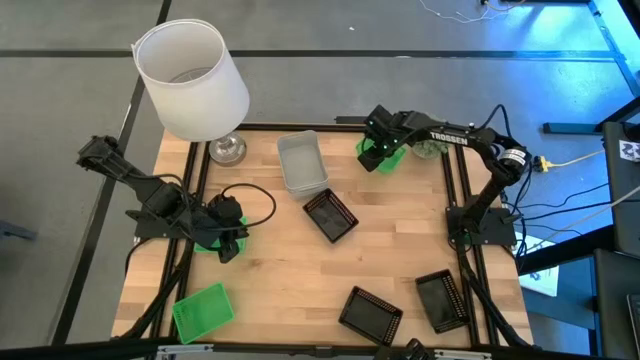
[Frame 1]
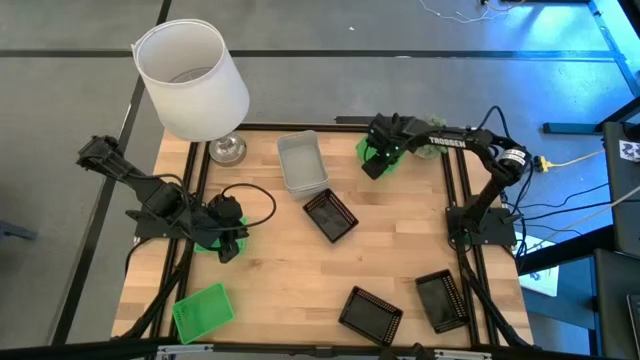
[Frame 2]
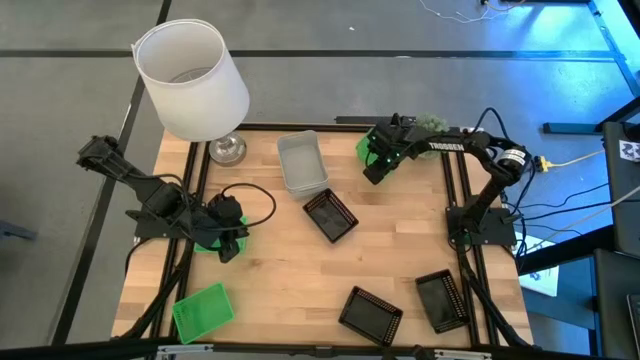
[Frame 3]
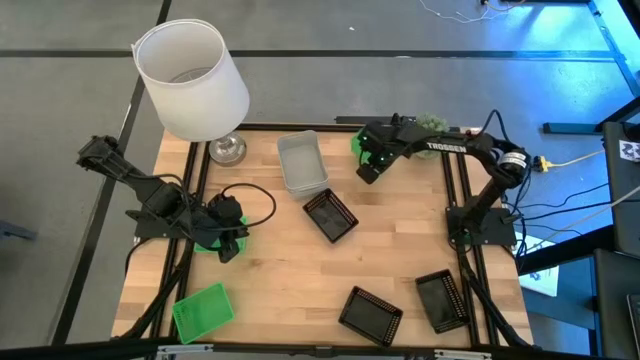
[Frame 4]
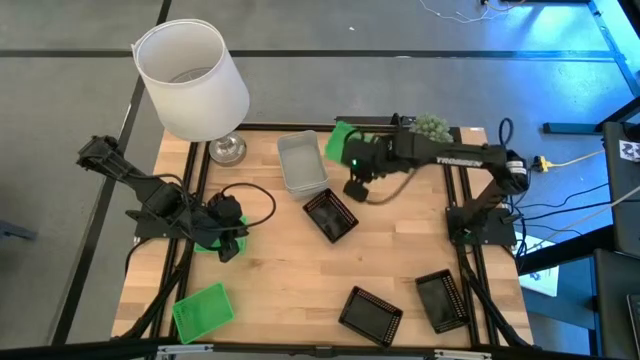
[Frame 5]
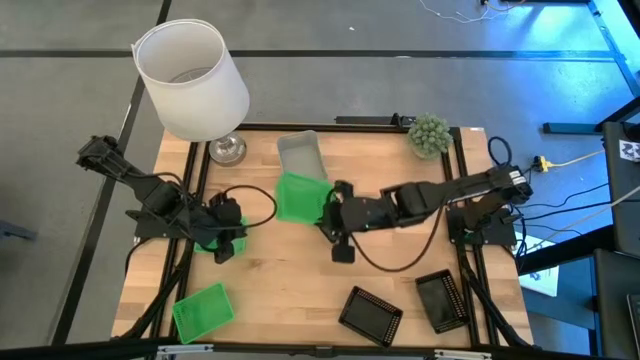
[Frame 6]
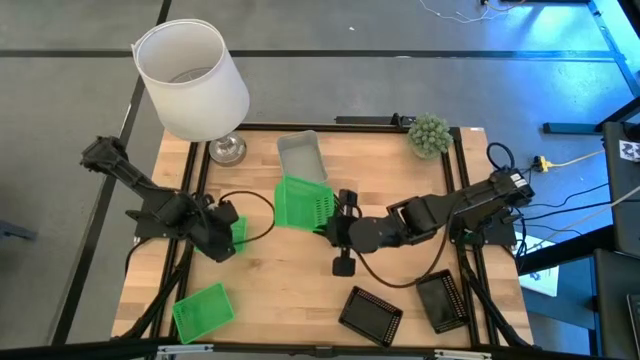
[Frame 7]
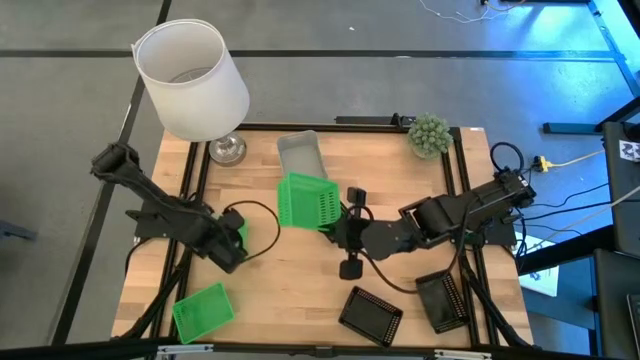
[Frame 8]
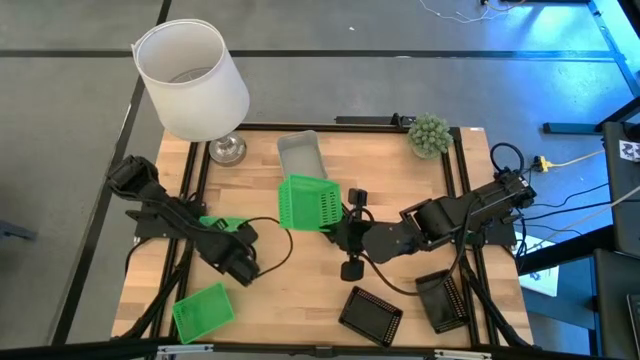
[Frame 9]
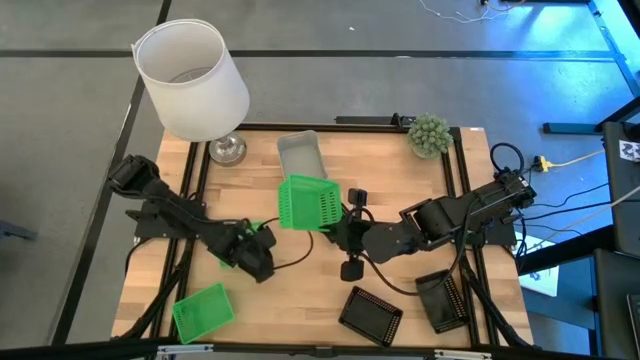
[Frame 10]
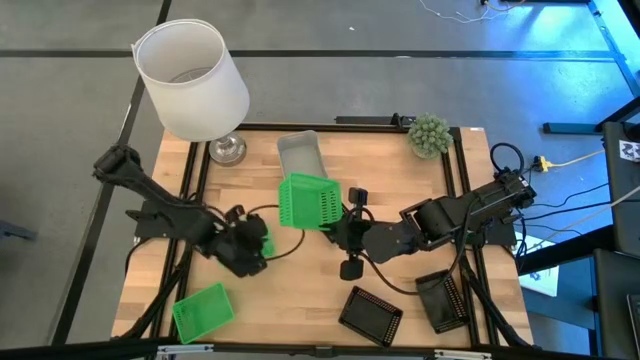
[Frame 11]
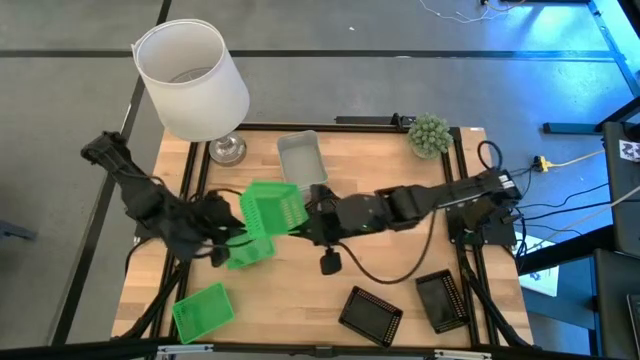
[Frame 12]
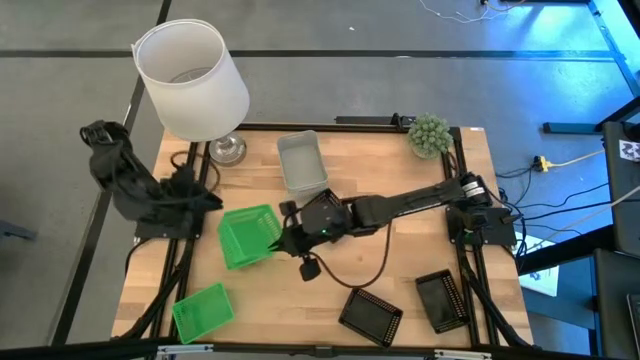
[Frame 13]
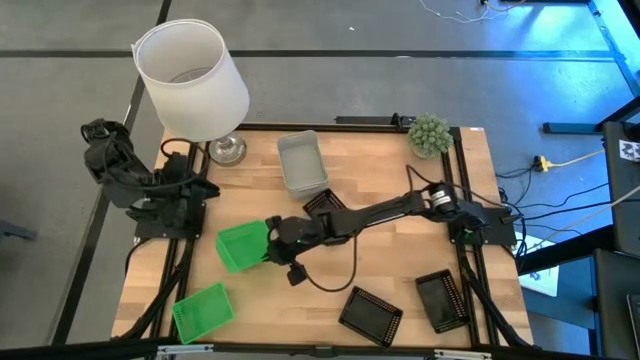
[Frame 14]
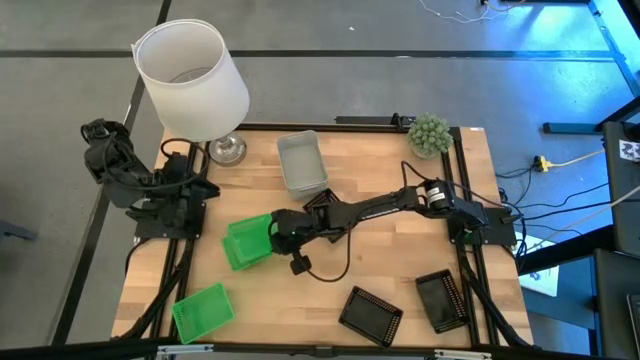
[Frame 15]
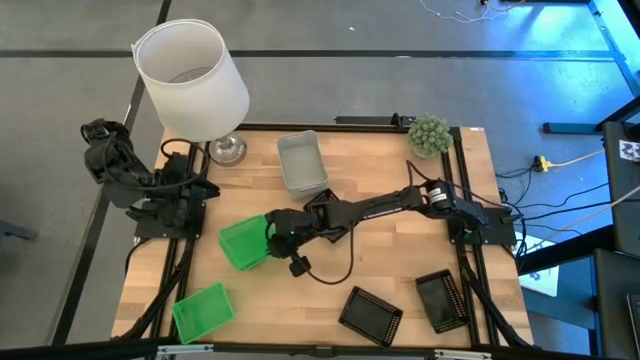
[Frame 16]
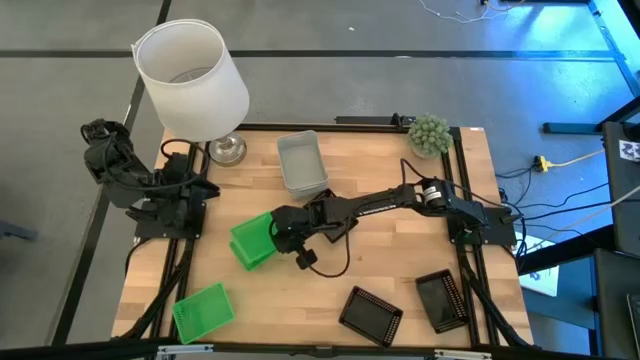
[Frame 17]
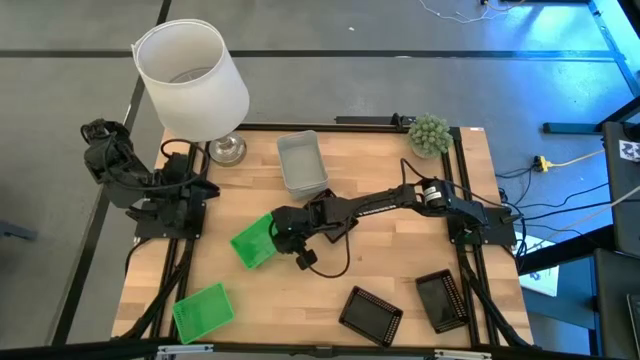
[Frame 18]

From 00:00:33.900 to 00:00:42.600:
Stack the top right green bin on the middle green bin

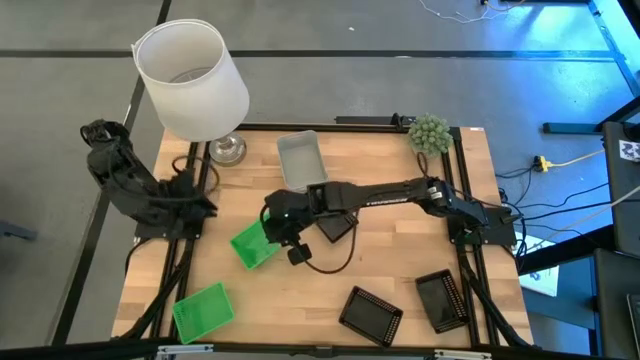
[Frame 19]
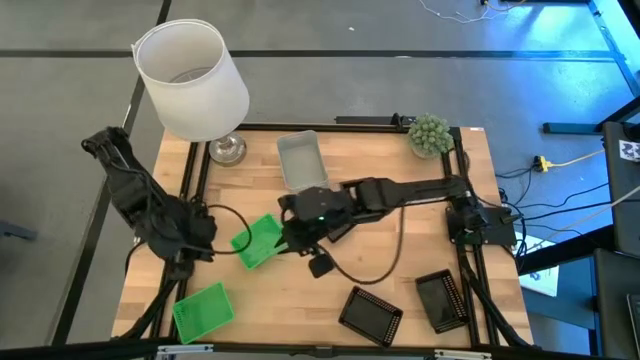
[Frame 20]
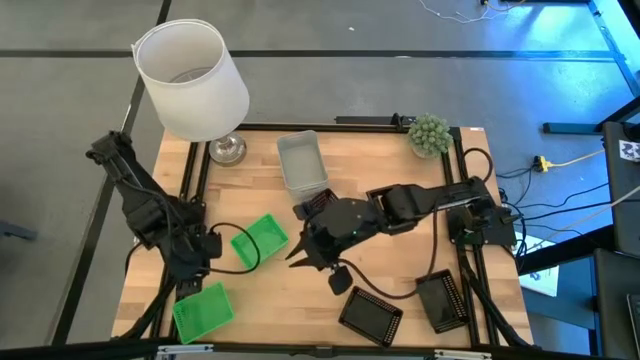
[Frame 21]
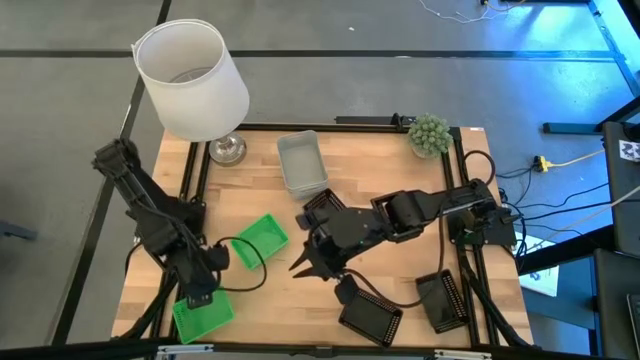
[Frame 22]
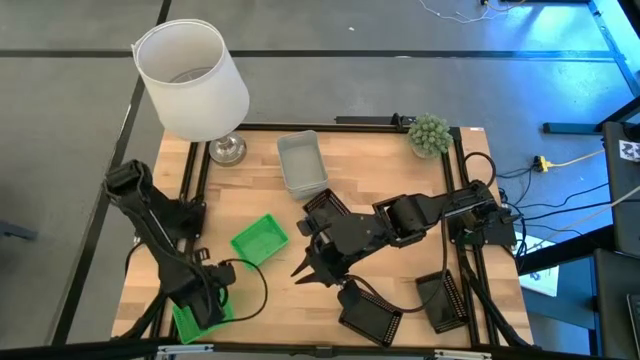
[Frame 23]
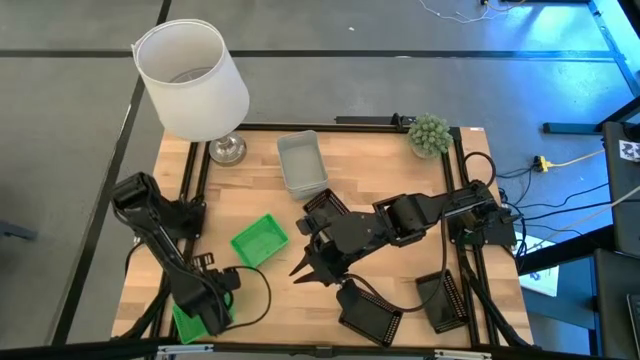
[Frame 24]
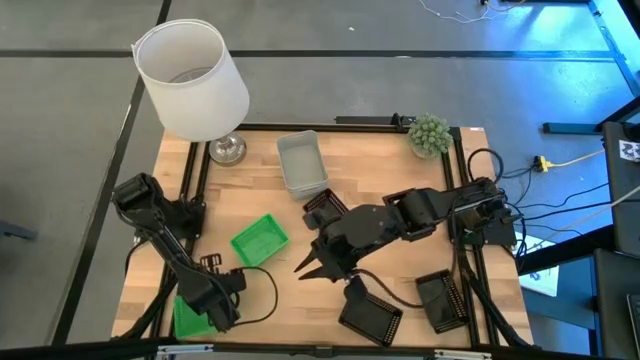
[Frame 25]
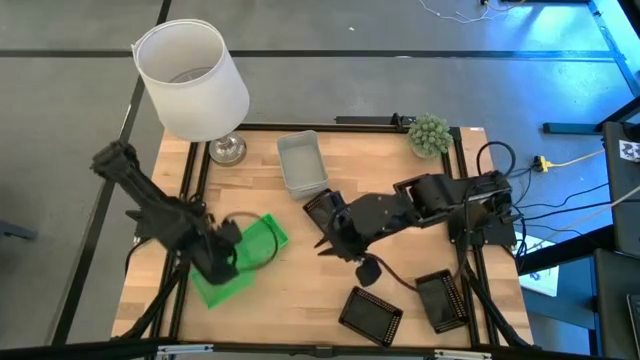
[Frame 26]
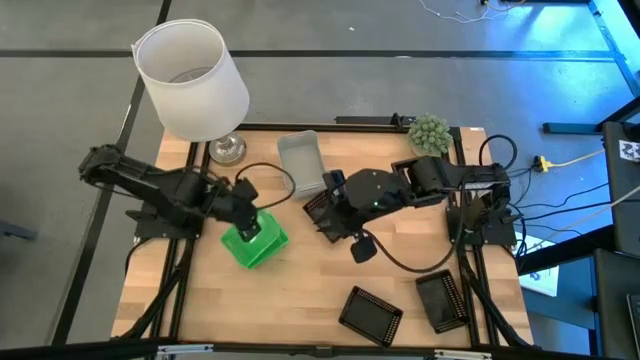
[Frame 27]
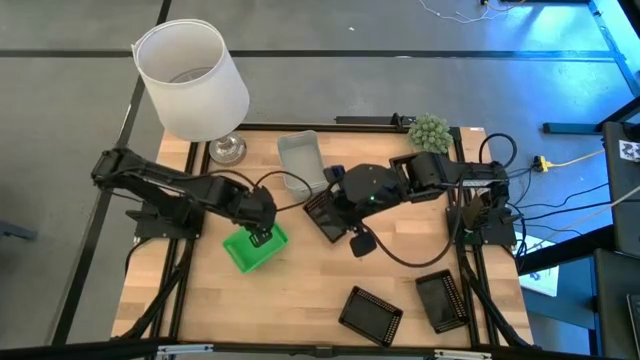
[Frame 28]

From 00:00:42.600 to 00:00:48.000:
Stack the bottom green bin on the top green bins

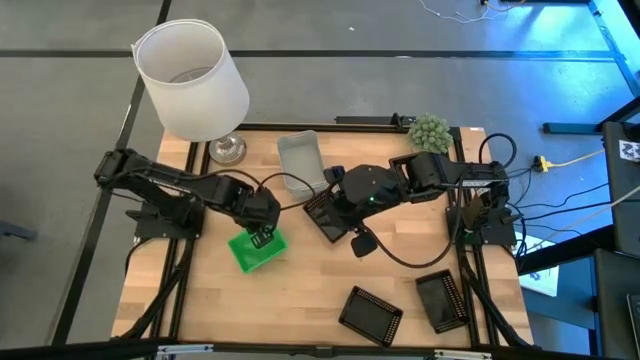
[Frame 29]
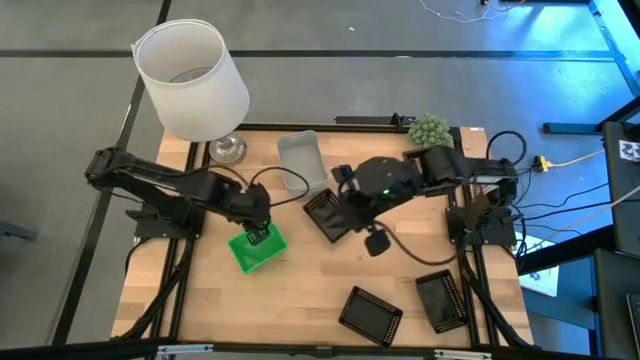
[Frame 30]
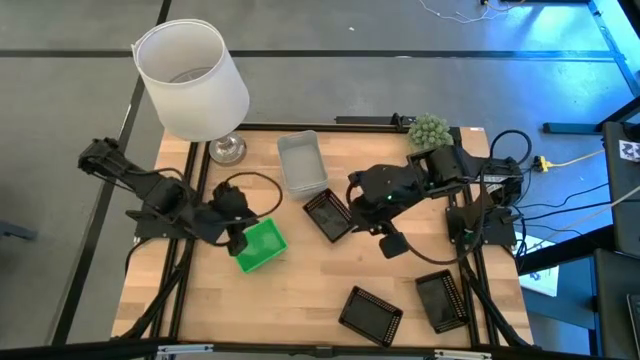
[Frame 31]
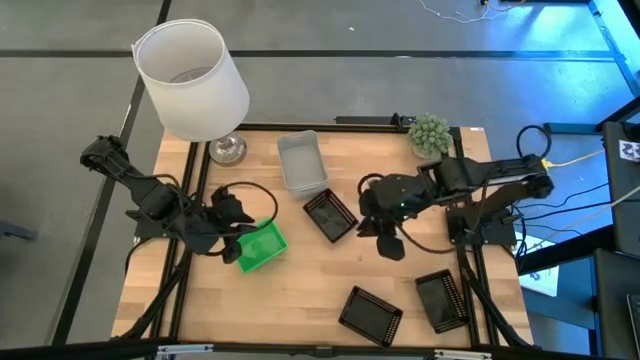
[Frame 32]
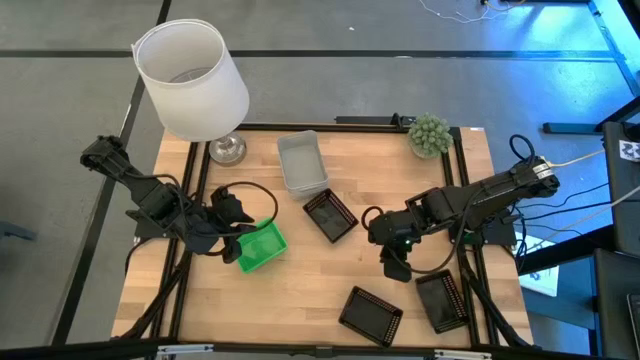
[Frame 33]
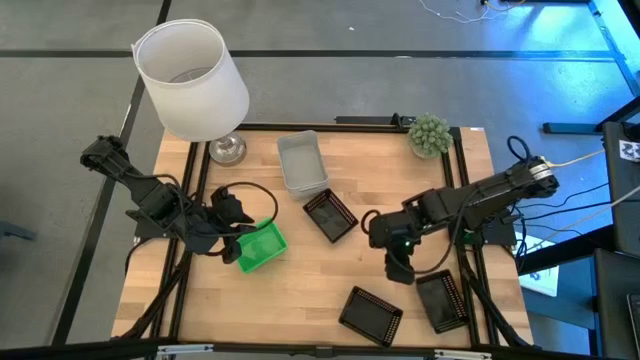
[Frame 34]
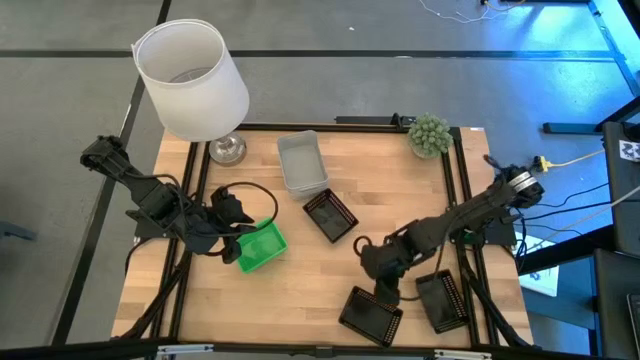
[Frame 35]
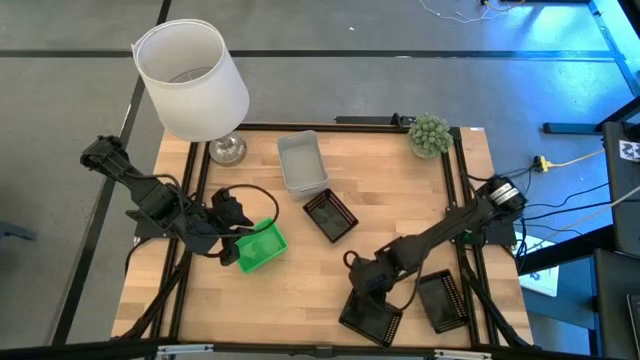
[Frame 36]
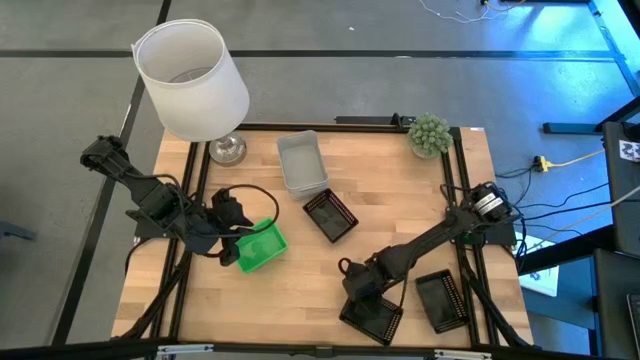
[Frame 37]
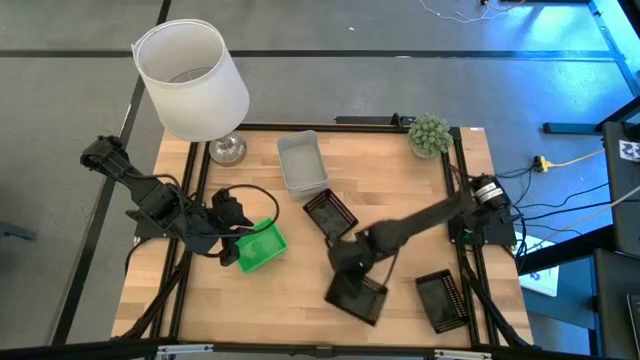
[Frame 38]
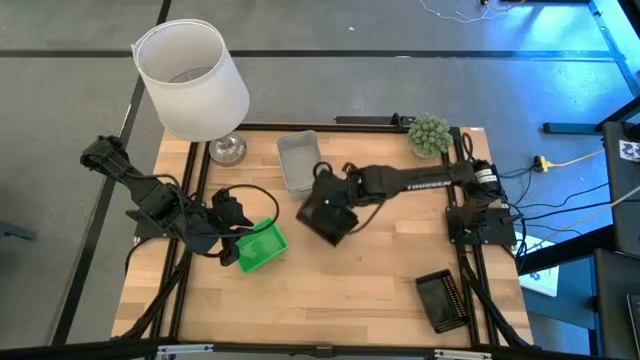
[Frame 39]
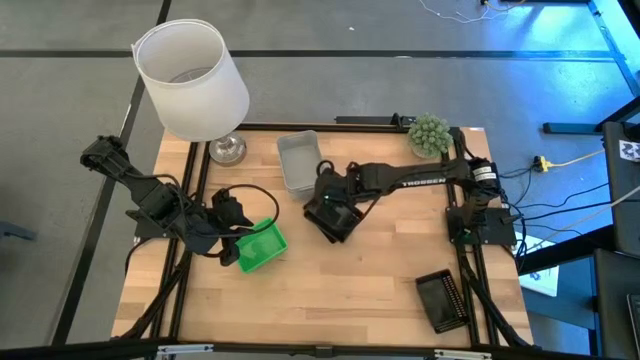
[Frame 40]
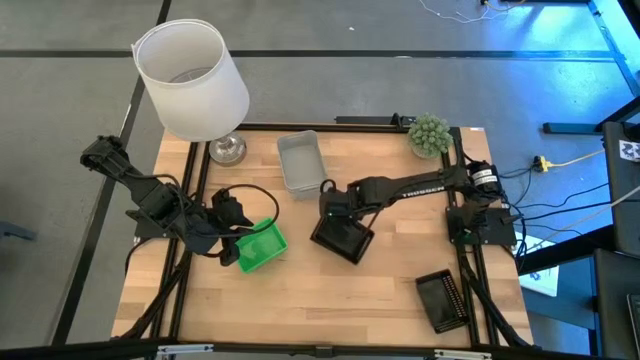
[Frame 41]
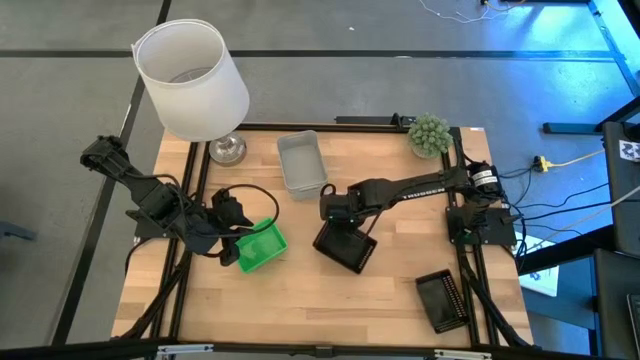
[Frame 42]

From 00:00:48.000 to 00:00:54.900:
Stack the bottom left black bin on the top black bin

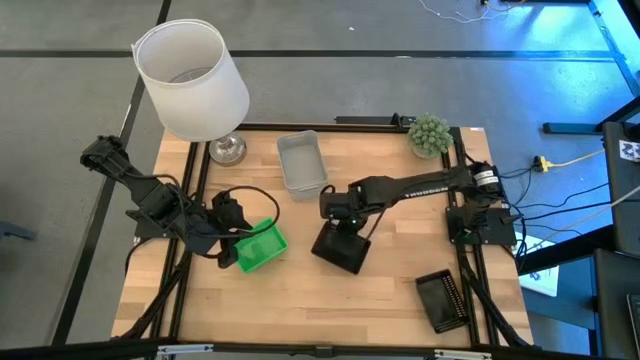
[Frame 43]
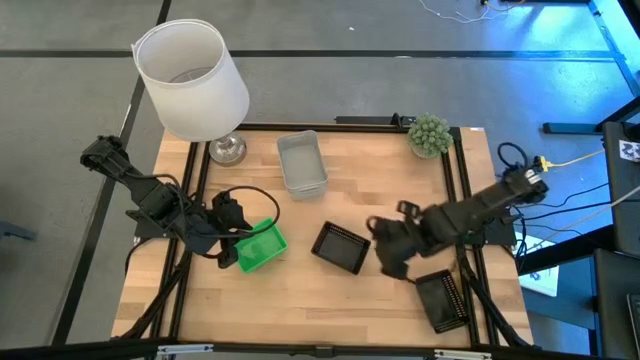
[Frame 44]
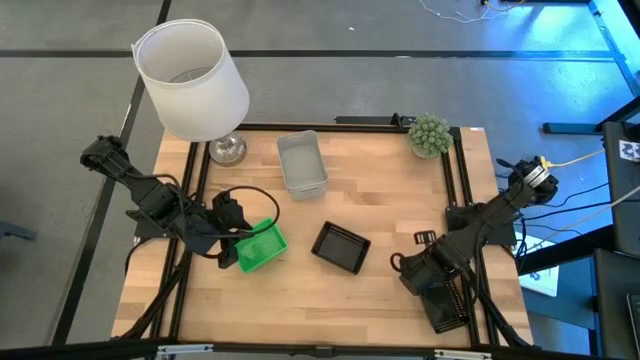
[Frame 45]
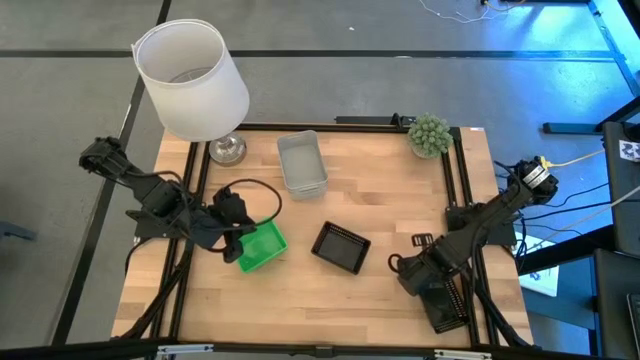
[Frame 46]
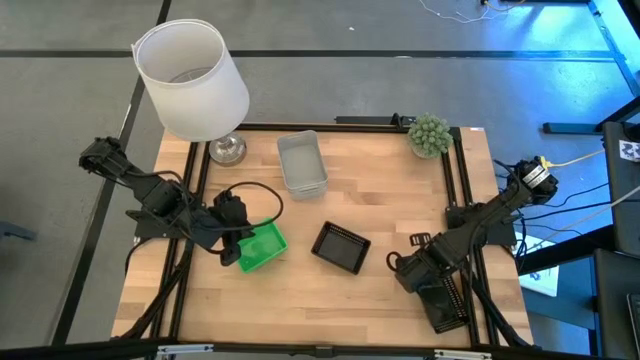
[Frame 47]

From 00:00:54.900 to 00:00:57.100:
Stack the right black bin on the top black bins
